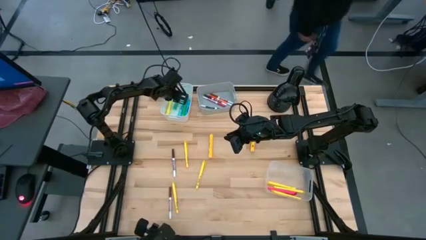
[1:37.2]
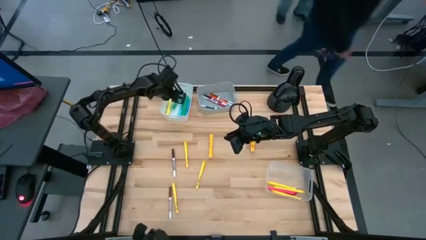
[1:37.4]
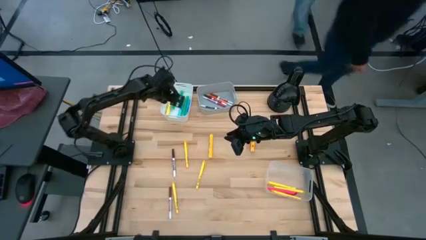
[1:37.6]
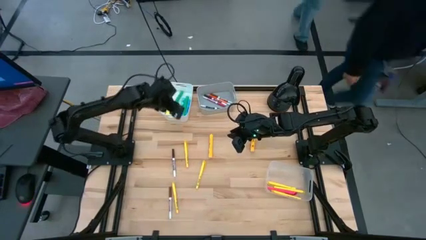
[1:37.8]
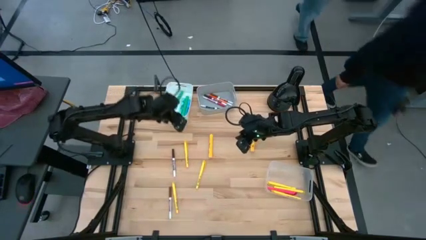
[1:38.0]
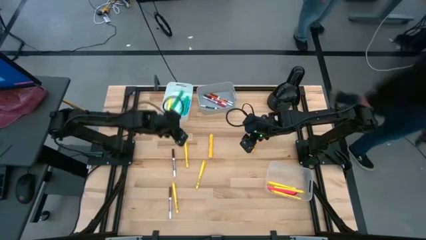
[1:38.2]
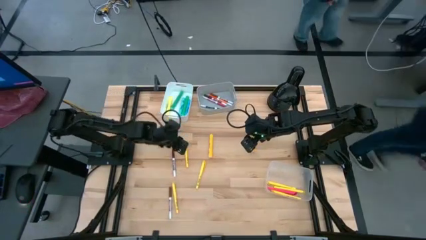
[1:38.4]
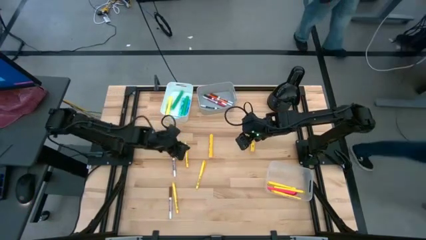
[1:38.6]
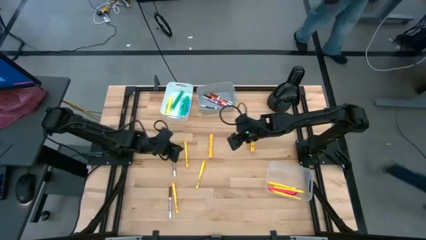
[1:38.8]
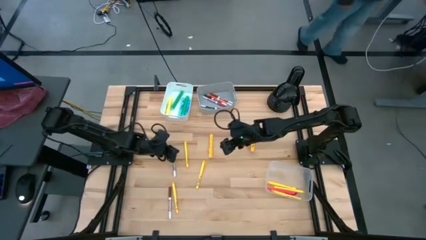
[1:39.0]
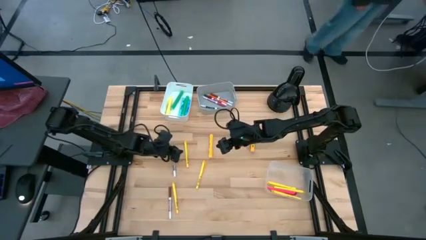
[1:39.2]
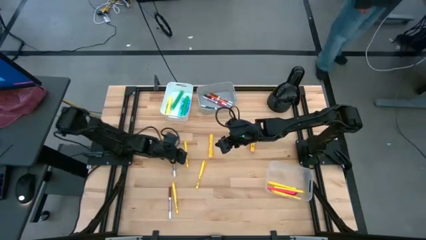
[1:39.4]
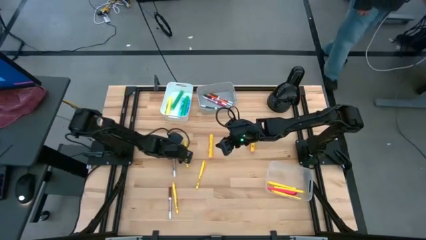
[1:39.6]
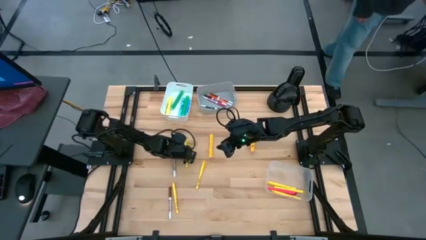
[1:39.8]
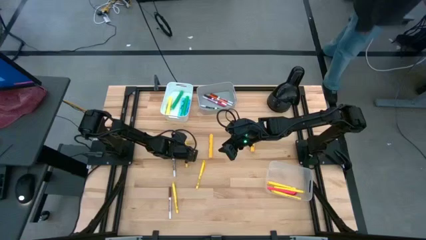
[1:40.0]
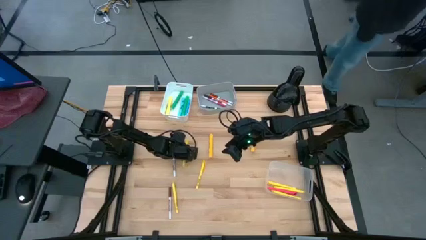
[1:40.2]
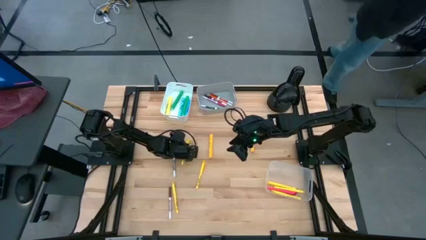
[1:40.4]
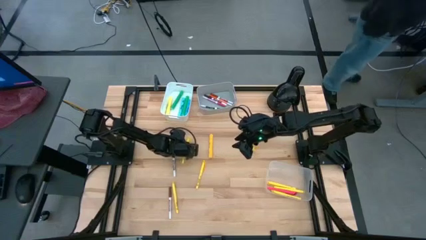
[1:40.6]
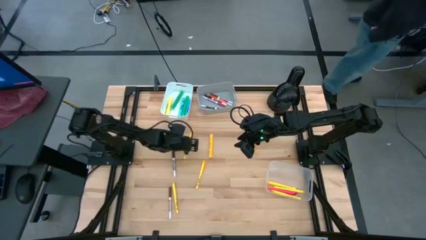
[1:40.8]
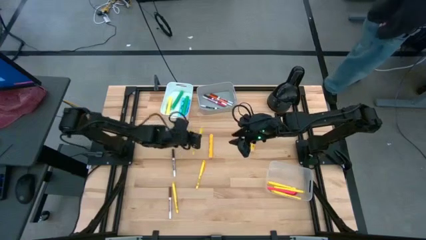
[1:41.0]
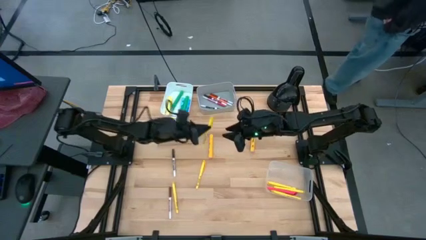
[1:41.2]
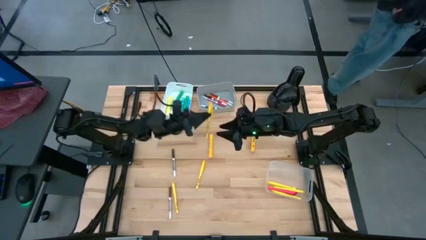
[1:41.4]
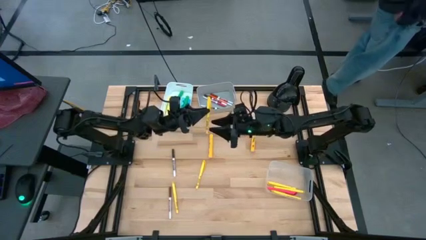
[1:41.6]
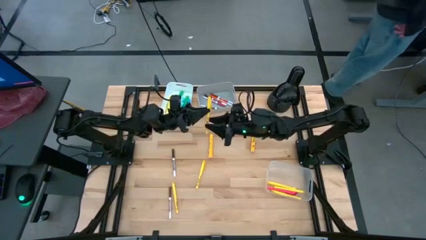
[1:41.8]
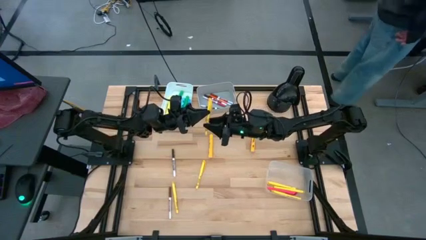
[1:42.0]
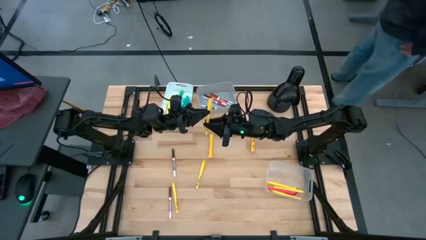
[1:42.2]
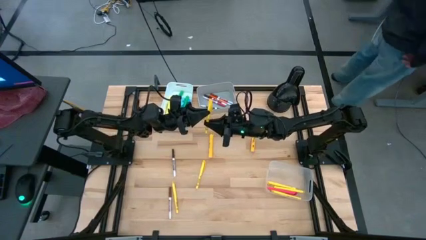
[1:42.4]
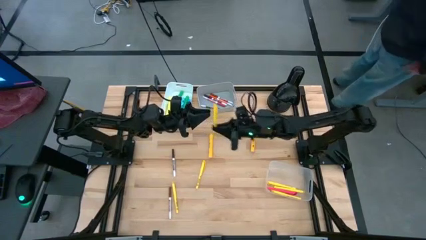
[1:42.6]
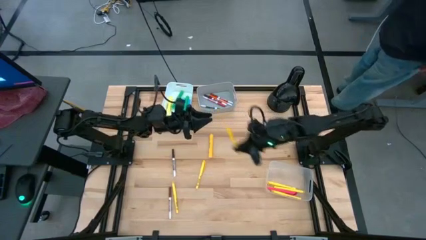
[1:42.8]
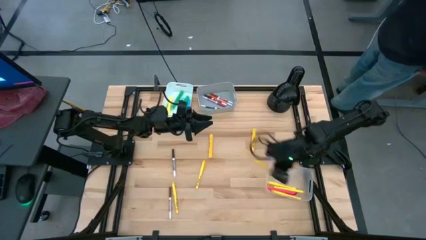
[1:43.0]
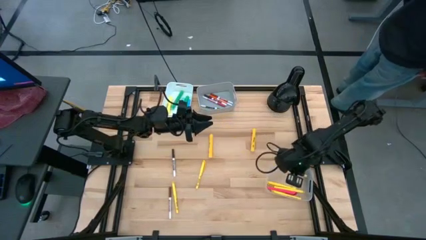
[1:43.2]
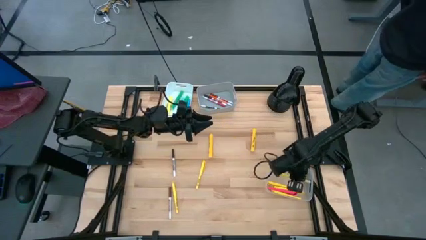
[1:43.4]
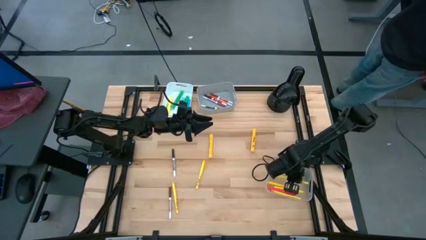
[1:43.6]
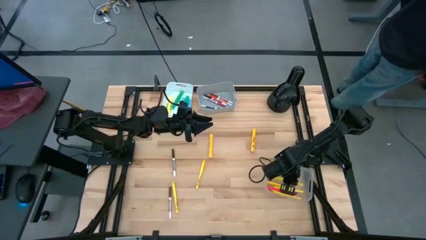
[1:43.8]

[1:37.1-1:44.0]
Task: Pick & Place Markers
Put the yellow pen into the transparent bin

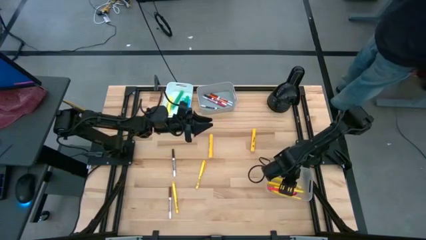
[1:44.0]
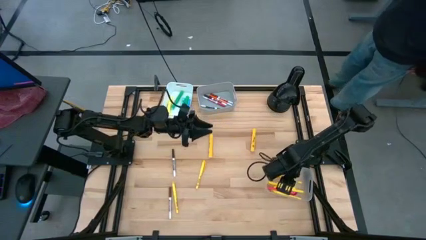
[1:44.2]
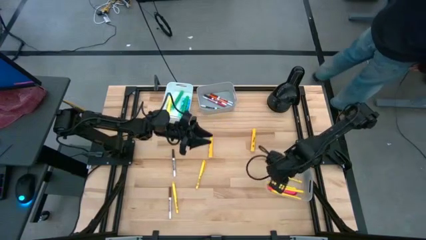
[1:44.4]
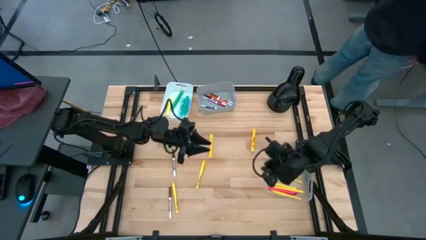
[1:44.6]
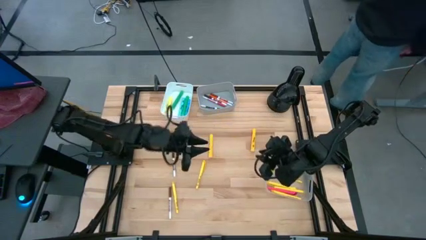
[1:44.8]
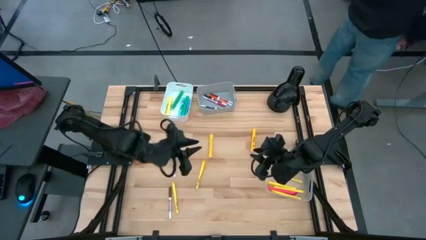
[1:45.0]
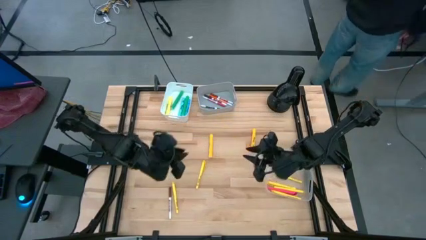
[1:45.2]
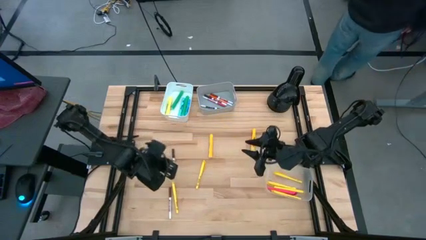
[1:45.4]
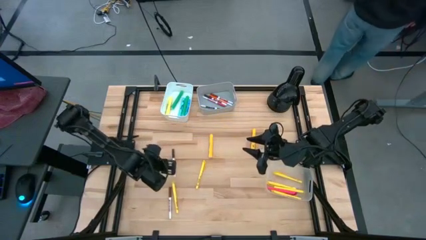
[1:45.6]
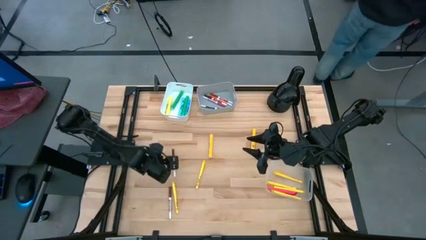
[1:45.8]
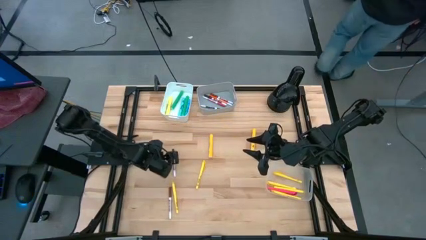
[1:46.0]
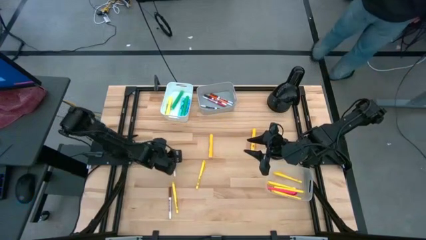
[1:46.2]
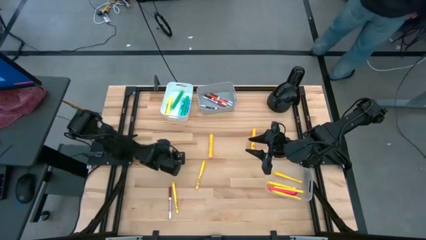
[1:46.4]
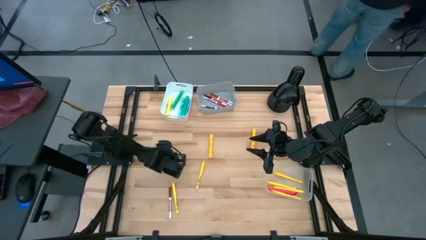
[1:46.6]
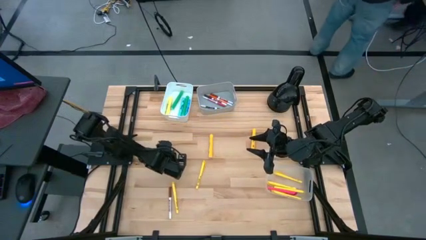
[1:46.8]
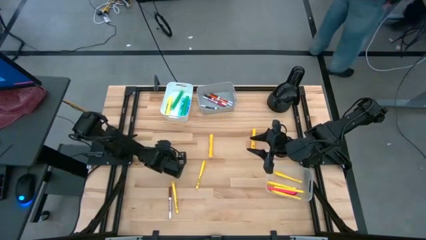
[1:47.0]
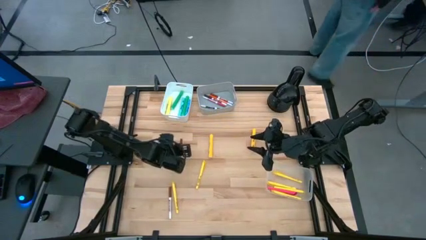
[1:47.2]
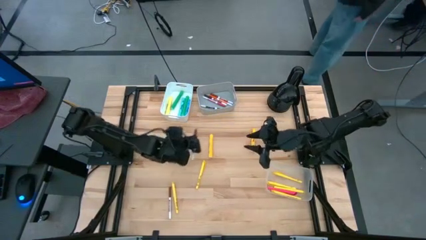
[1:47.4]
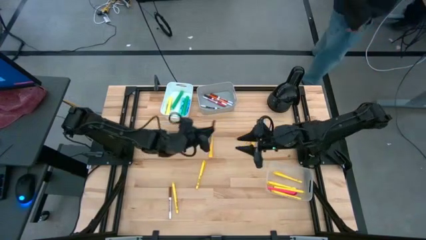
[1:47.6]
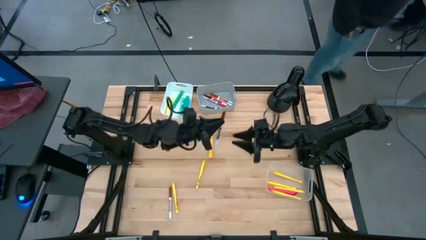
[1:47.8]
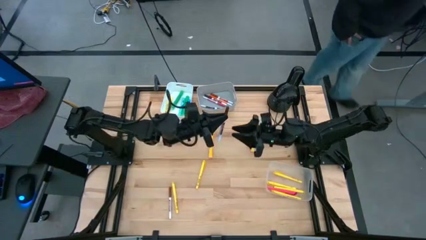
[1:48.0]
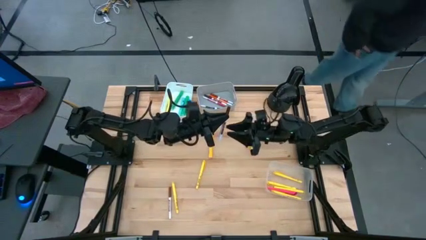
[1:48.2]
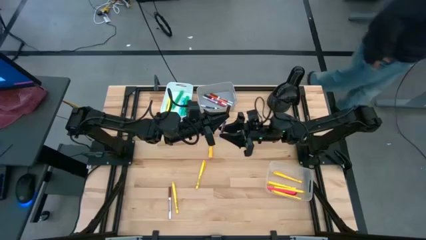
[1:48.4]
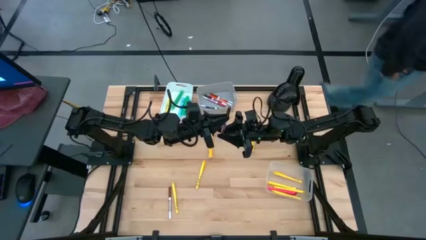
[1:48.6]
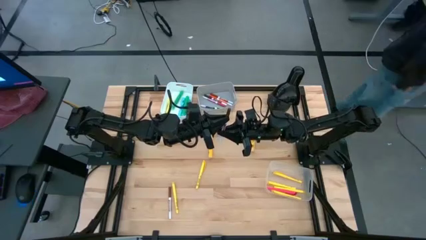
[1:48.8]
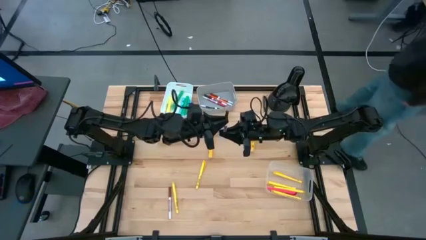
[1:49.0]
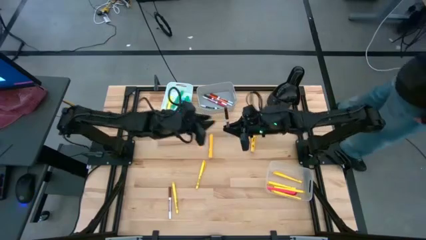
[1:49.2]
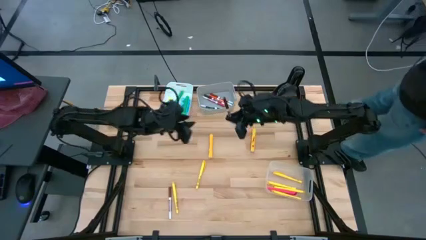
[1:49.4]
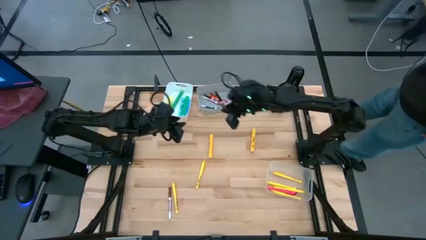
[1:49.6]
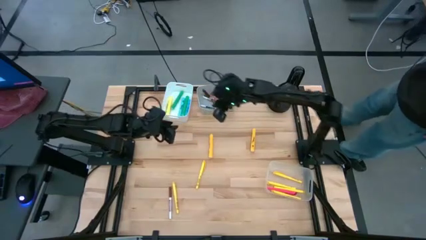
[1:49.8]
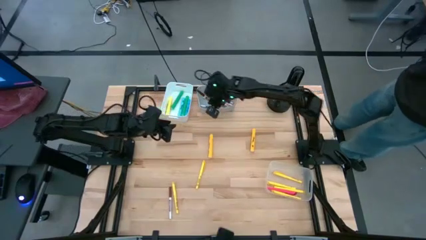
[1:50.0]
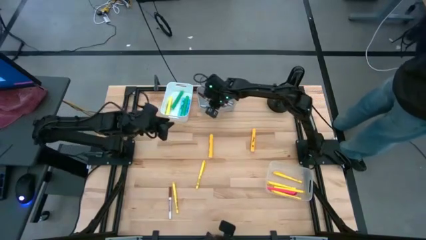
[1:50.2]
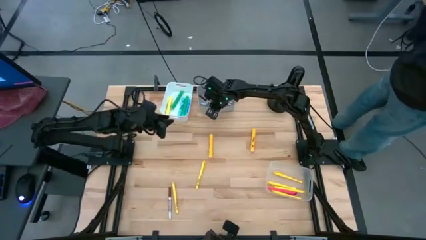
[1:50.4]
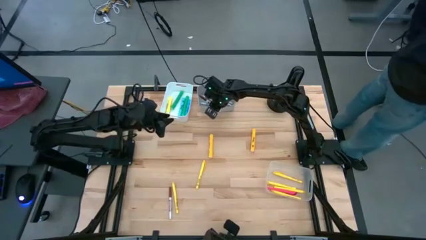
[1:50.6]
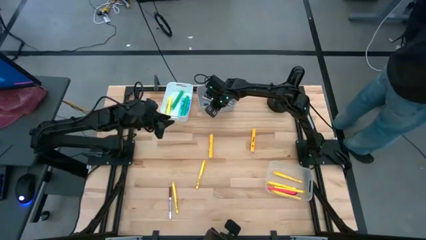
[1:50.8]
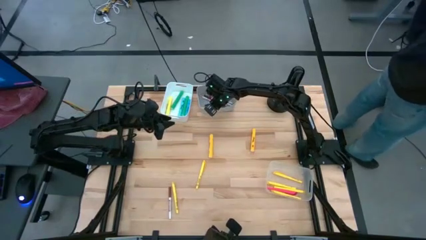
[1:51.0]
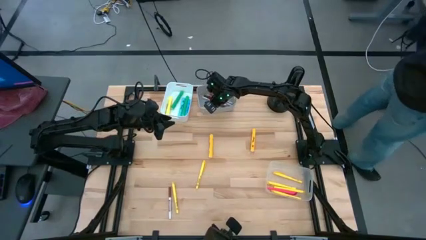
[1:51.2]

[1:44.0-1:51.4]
Put the brown marker pen into the gray bin

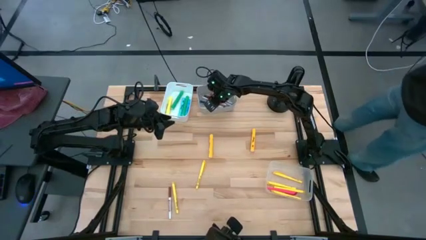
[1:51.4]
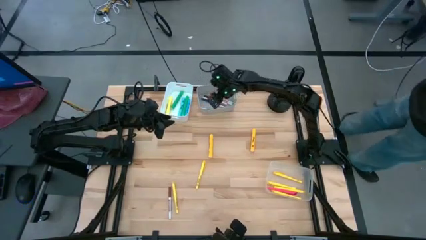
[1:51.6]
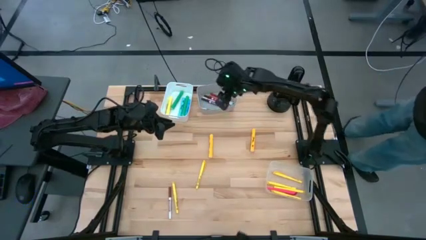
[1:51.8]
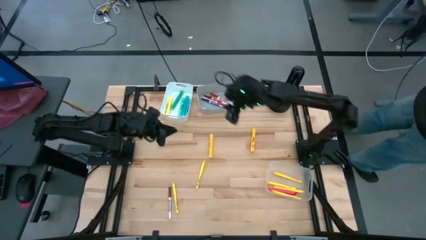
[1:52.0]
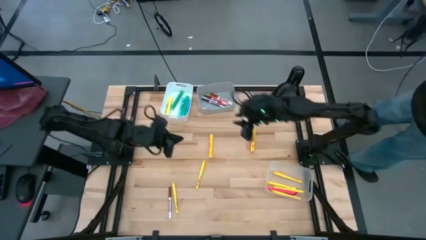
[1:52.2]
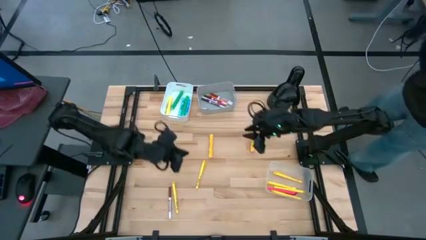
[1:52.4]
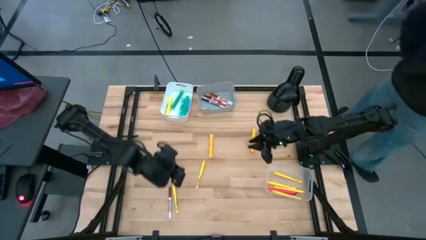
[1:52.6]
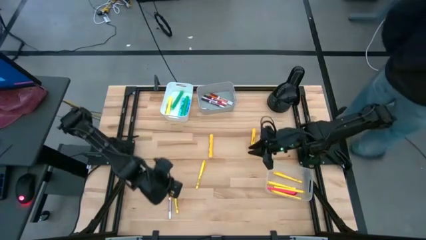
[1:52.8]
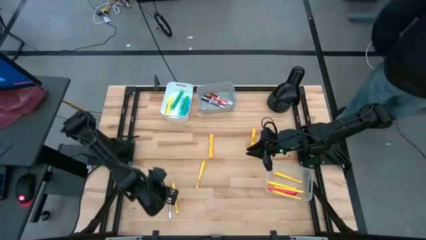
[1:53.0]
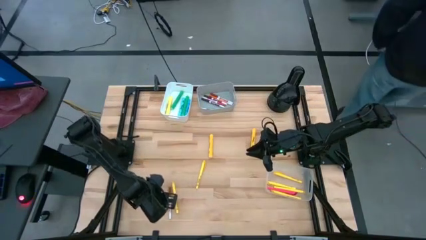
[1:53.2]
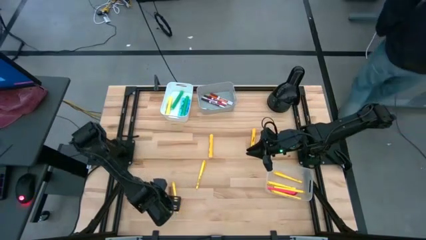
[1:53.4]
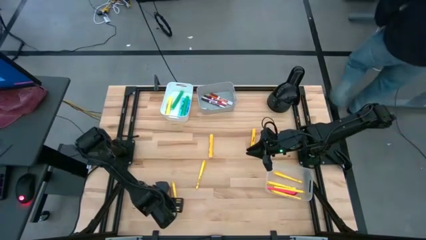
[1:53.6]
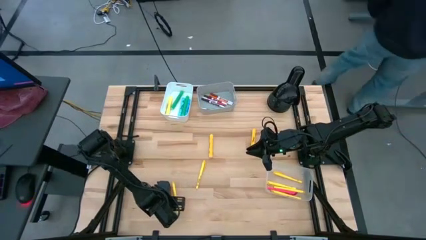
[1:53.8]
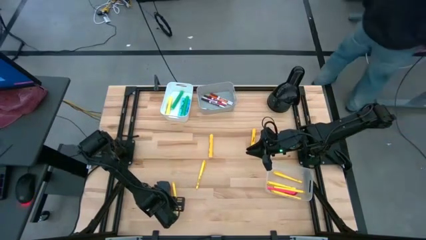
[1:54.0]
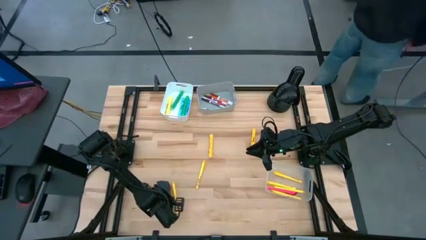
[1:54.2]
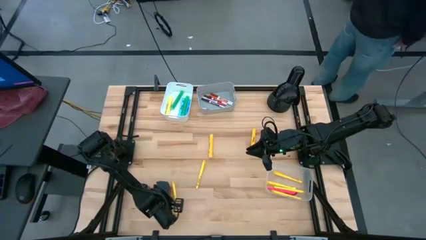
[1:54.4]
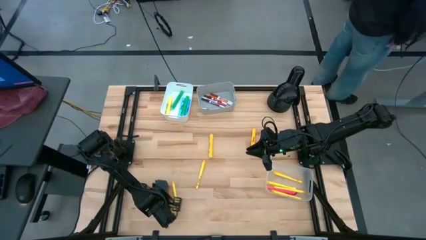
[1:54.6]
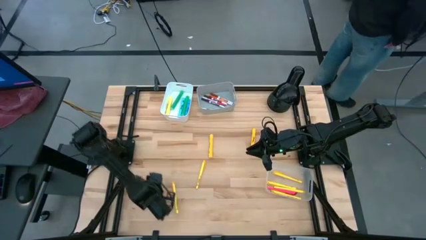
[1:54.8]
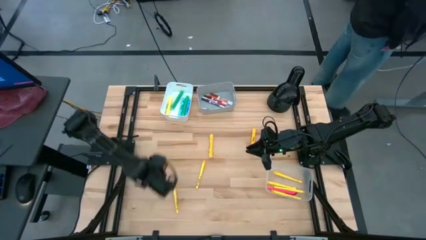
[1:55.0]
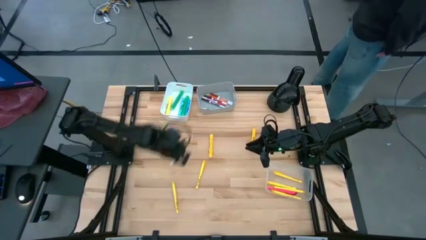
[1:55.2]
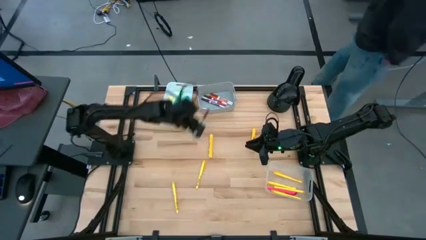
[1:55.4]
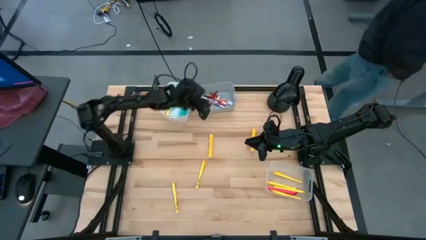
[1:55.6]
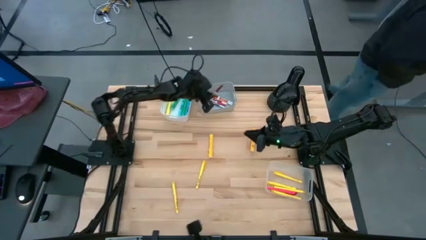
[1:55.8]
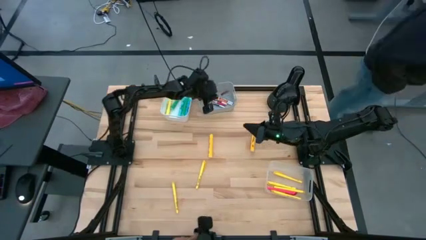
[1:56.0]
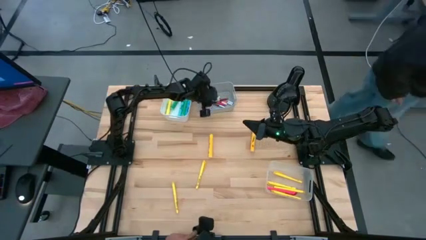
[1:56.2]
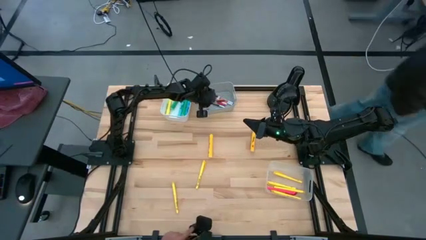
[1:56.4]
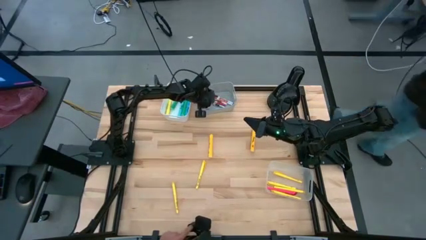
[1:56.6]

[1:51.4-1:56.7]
Put the brown marker pen into the gray bin
